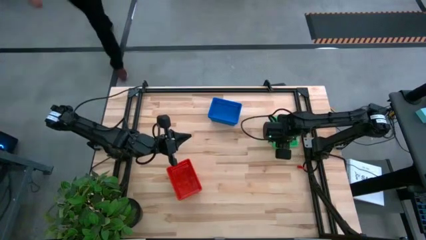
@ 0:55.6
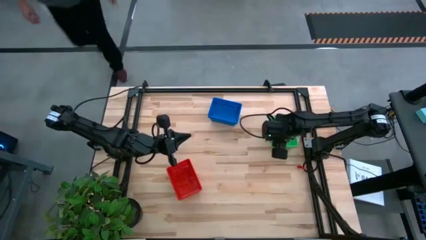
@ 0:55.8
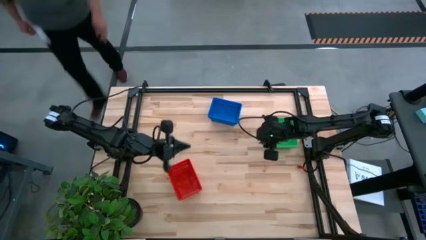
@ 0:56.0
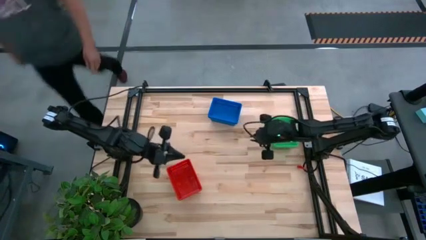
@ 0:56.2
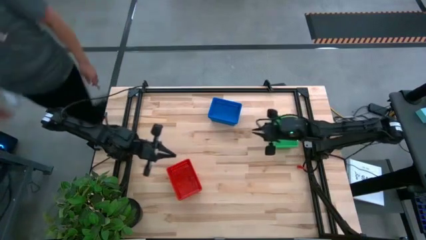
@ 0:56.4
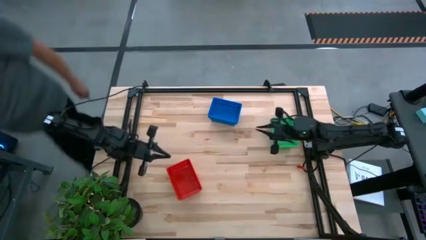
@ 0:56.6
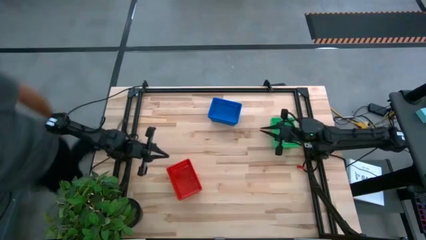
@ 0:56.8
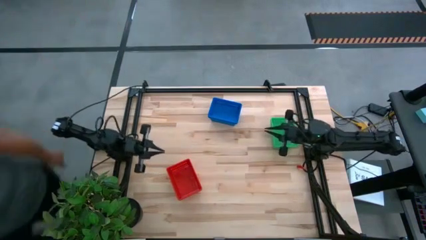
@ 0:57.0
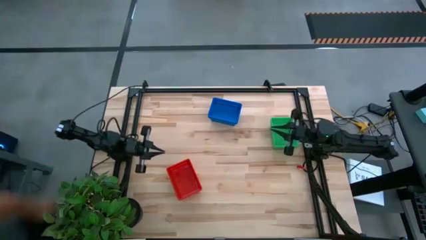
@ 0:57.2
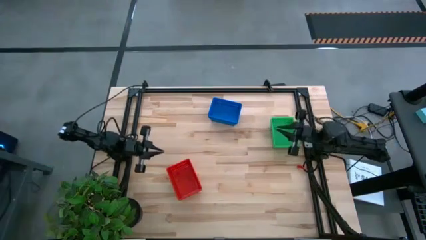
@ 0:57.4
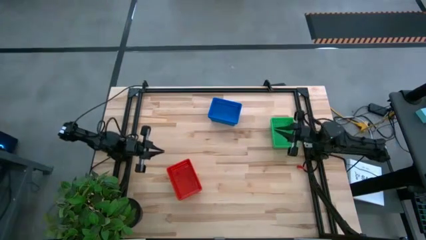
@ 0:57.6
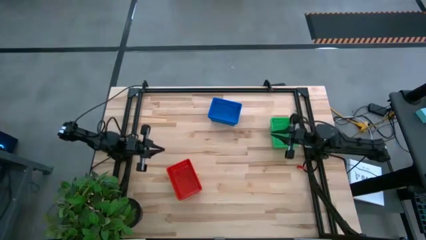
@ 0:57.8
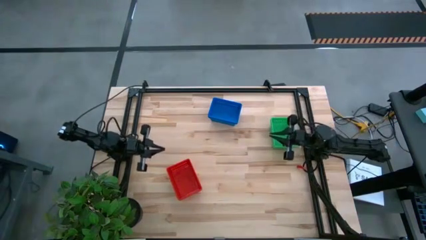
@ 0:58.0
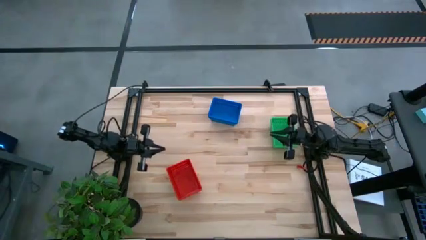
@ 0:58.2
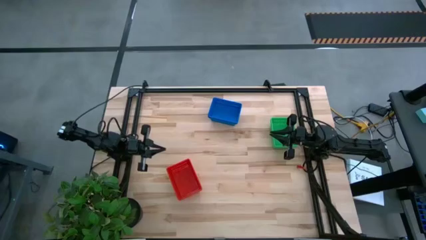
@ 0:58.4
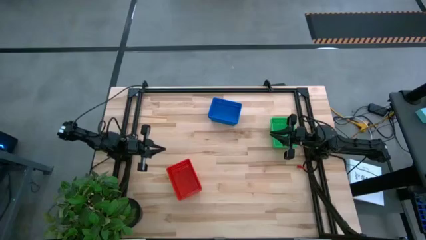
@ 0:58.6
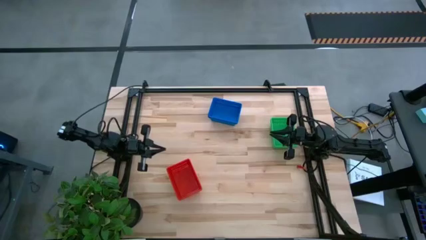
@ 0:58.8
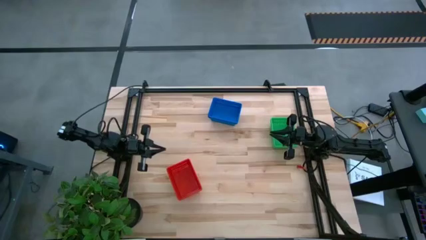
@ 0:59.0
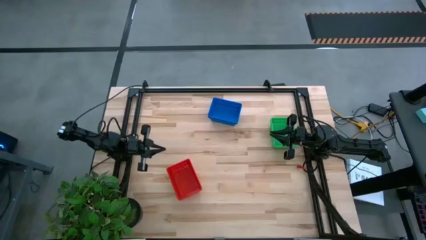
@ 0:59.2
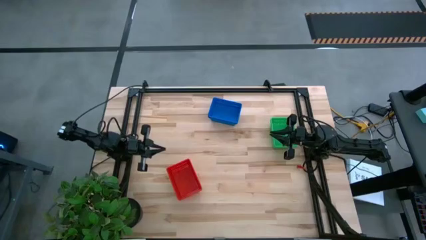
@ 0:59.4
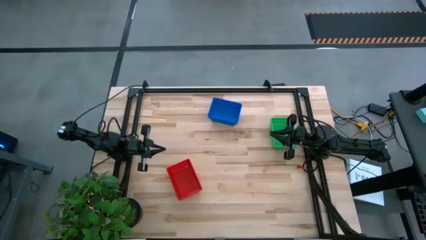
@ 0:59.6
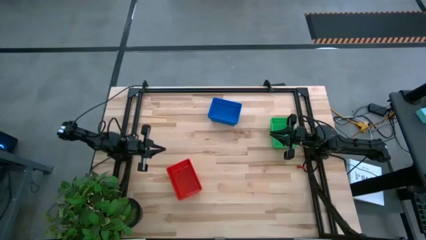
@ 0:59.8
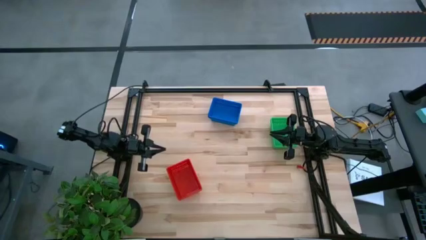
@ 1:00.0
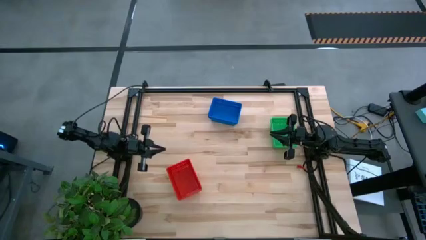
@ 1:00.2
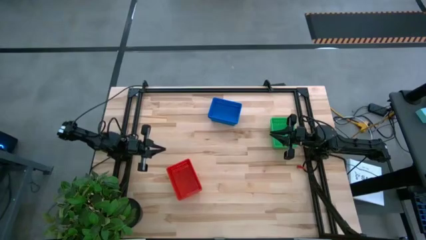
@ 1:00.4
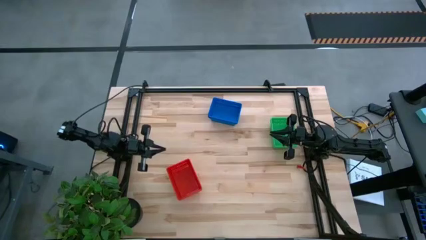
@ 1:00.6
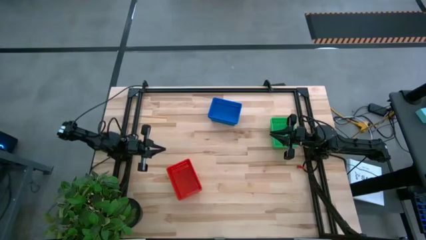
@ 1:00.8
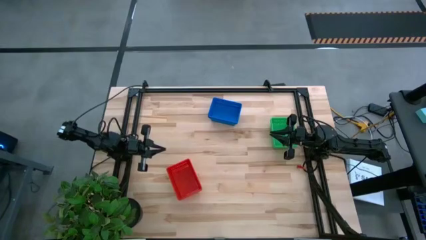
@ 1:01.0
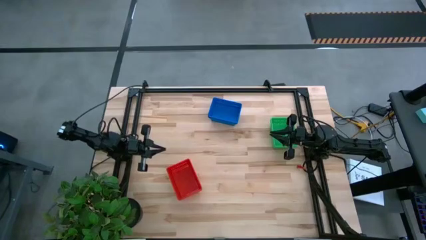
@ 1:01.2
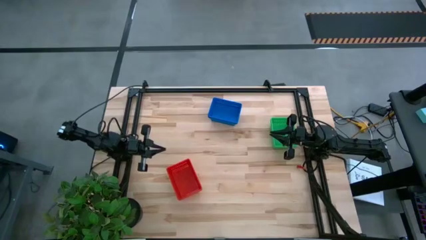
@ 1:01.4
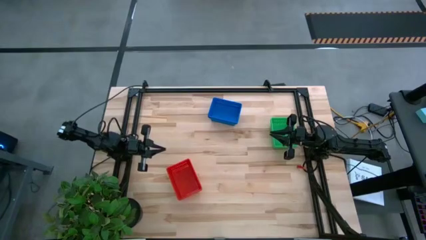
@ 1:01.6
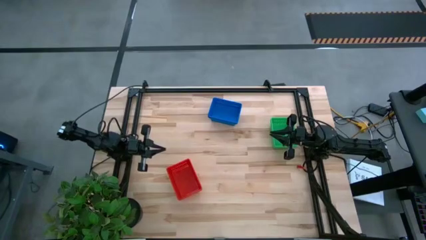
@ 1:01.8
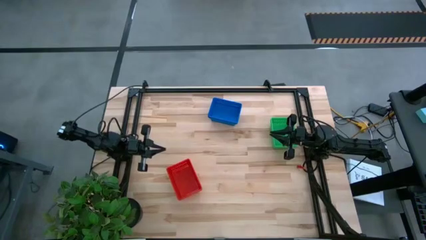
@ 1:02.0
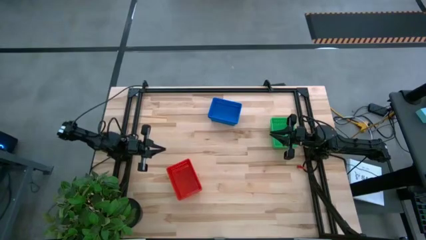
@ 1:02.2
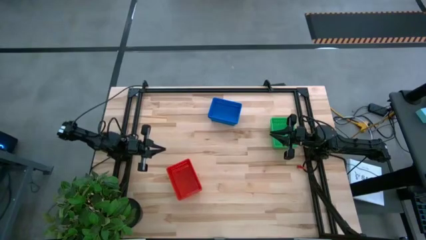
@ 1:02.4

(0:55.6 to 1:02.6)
Return to Home Position

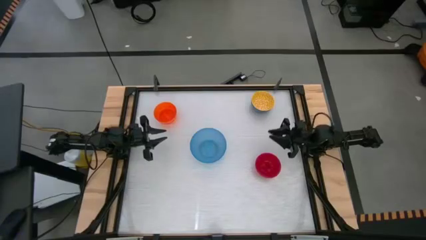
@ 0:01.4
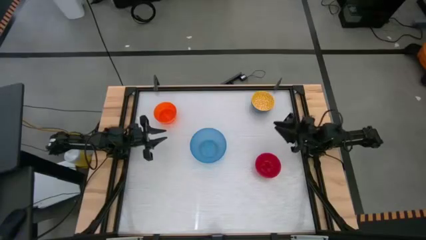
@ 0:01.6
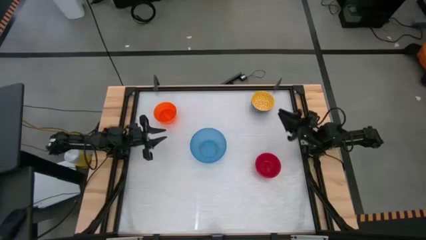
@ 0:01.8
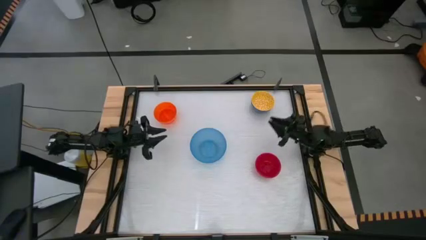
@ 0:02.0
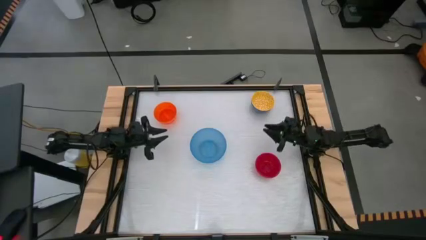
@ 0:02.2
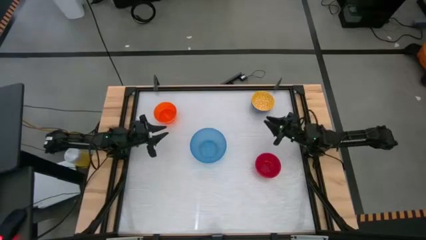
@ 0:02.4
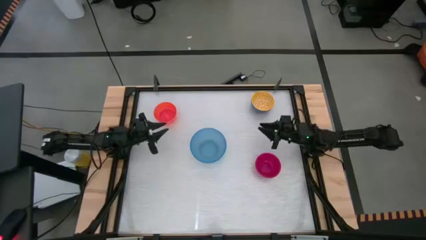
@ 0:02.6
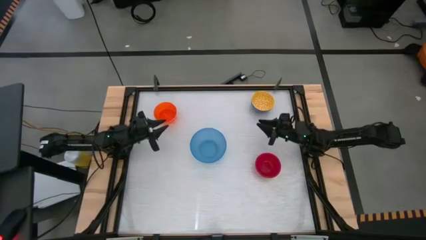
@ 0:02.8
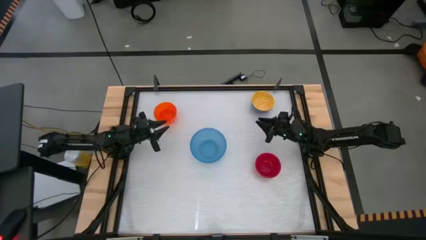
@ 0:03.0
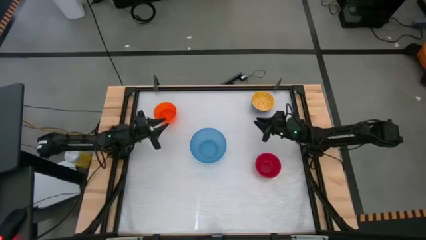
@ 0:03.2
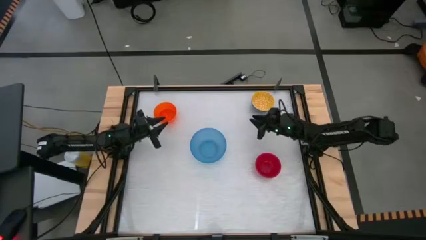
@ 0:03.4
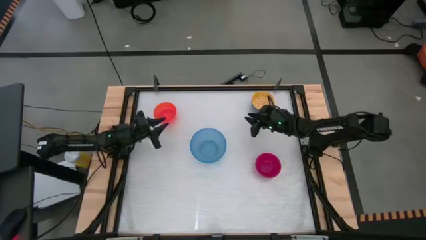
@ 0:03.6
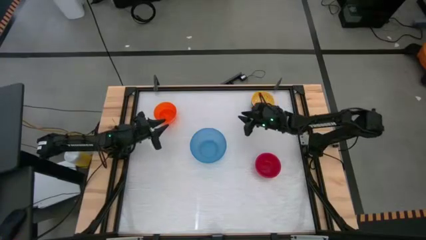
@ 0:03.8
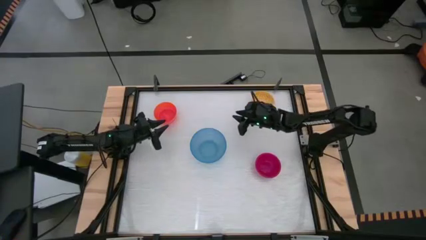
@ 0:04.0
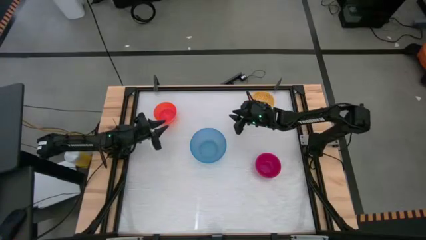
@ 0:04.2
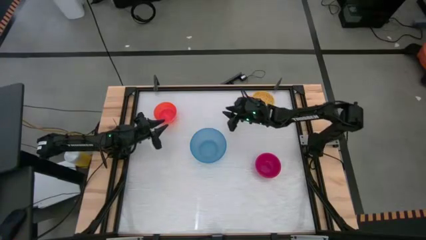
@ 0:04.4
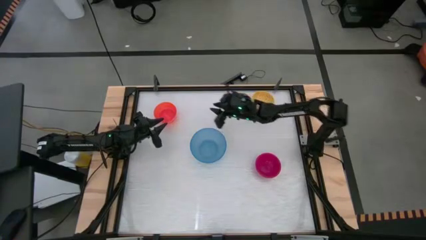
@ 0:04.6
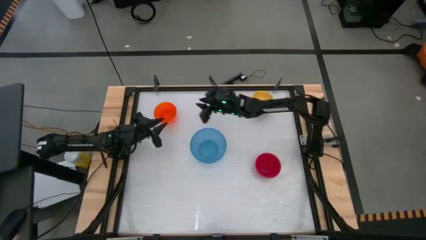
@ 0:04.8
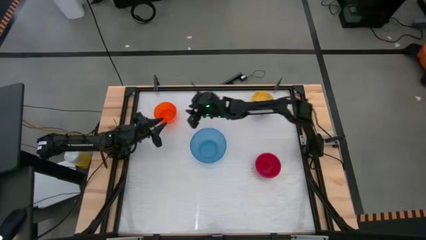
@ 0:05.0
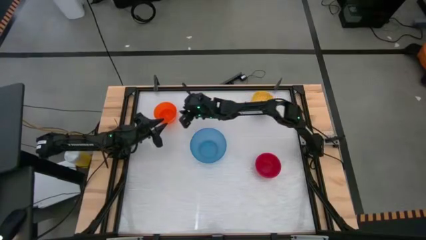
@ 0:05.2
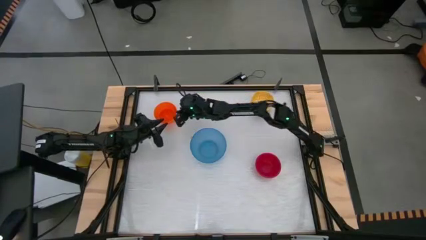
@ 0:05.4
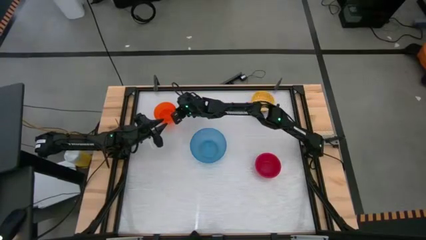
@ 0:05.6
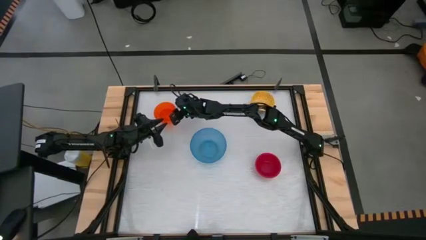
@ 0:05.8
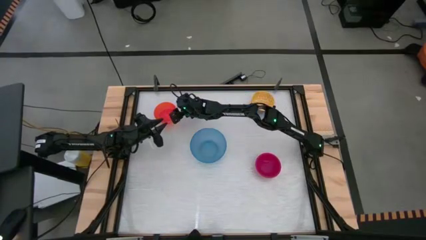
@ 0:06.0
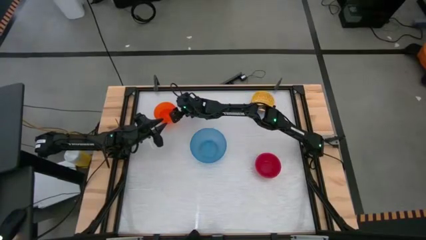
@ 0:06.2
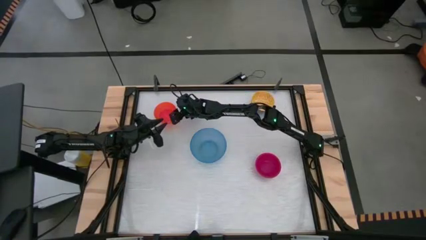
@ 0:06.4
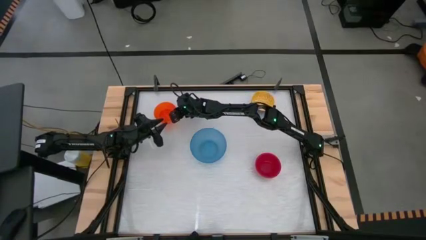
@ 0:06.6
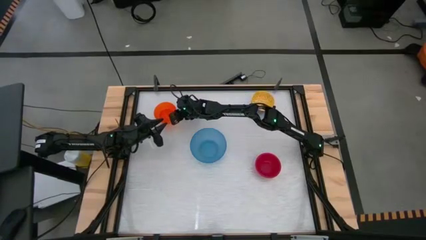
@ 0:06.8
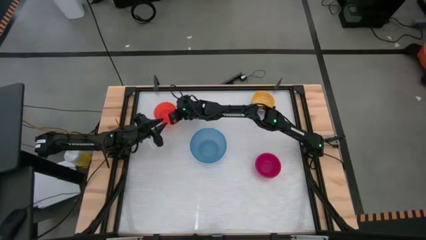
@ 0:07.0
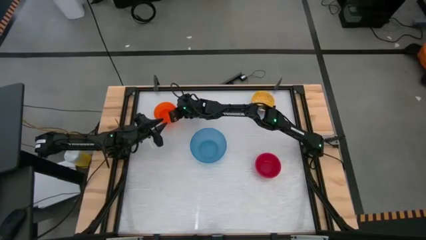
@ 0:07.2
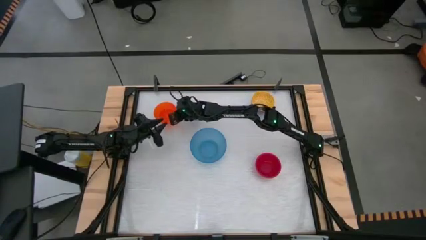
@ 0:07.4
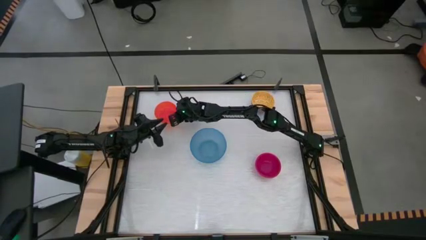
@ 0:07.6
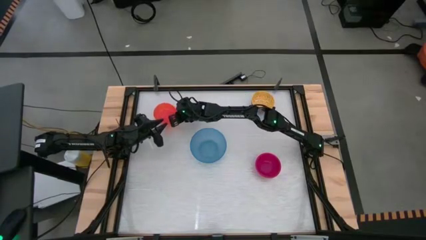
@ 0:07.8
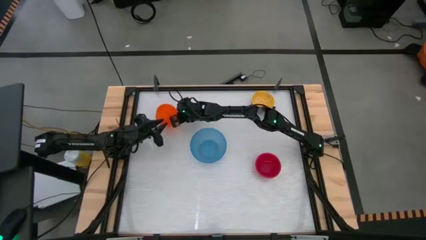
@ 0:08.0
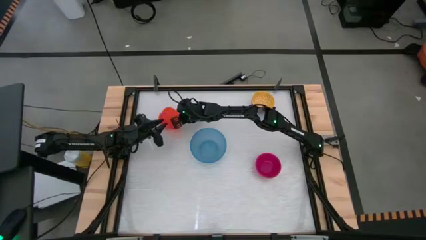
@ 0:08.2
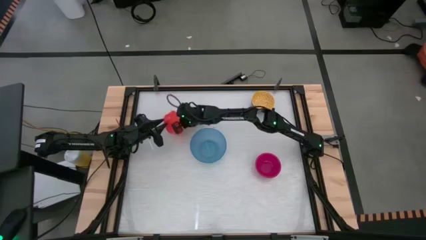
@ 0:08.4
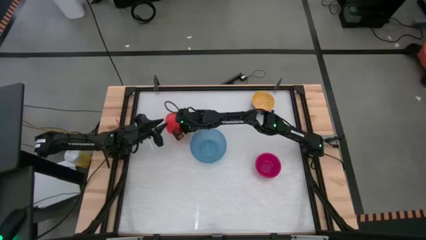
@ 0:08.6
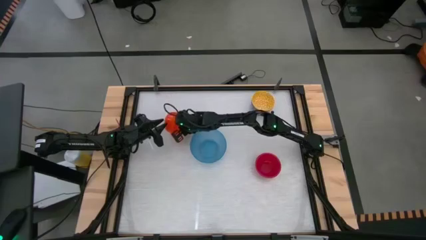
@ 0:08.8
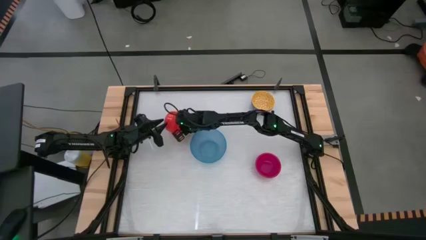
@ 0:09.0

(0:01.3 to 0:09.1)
Stack the orange bowl on top of the blue bowl

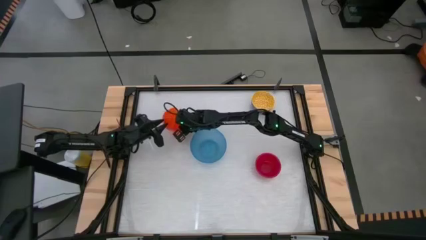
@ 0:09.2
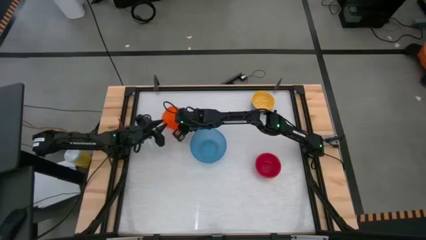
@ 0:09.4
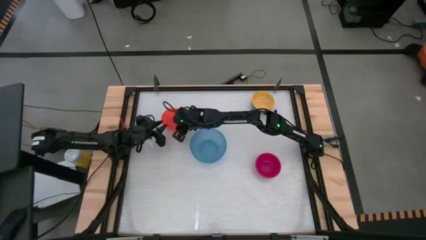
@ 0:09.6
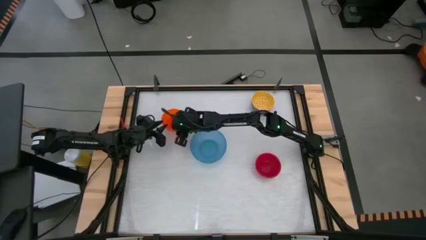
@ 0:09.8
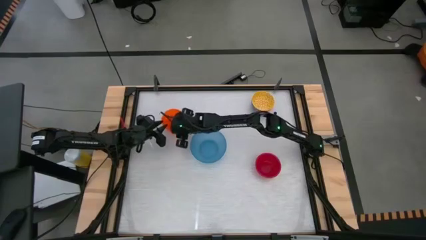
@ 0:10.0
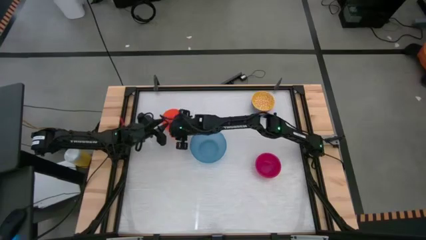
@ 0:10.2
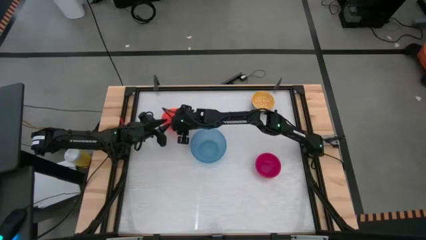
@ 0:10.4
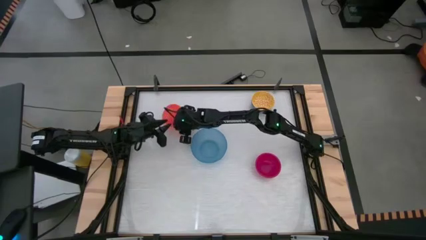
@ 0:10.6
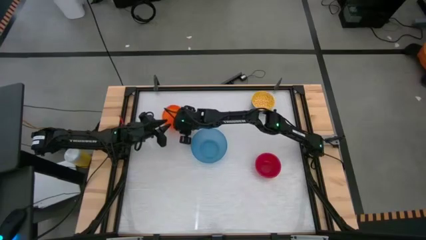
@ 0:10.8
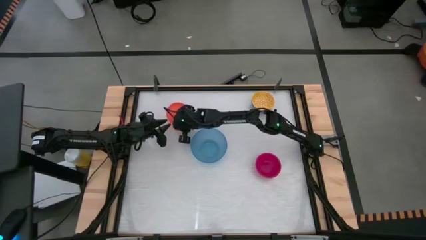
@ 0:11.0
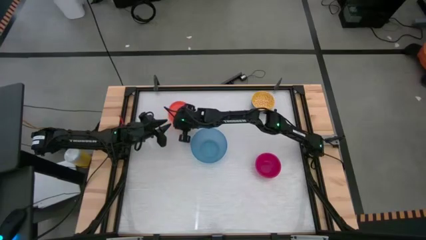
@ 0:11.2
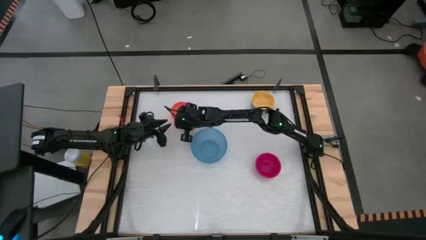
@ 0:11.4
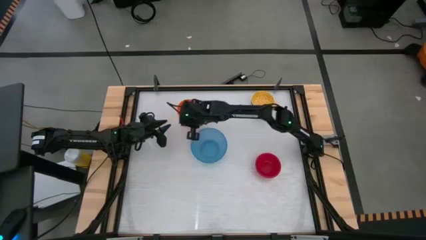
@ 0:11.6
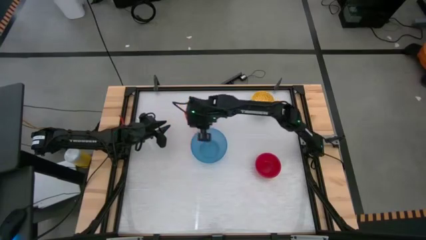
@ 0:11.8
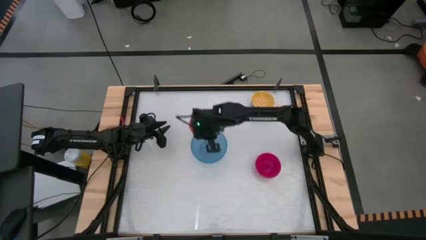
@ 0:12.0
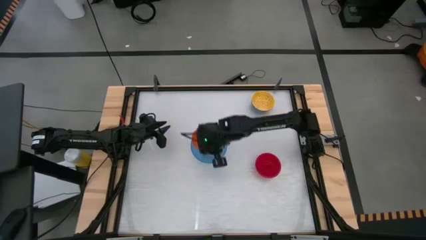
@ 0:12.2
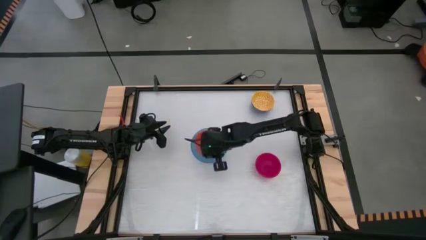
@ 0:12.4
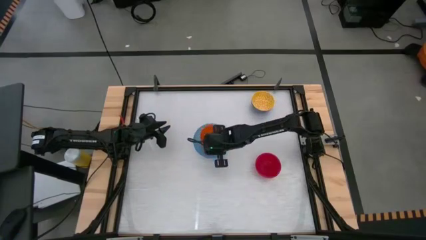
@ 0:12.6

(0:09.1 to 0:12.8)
Stack the orange bowl on top of the blue bowl
